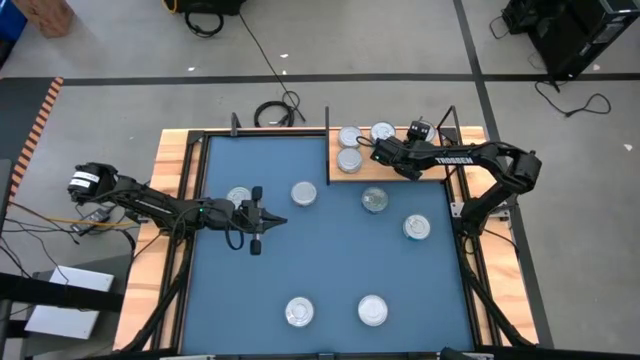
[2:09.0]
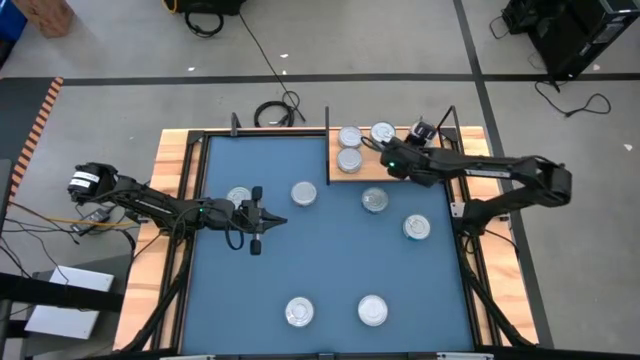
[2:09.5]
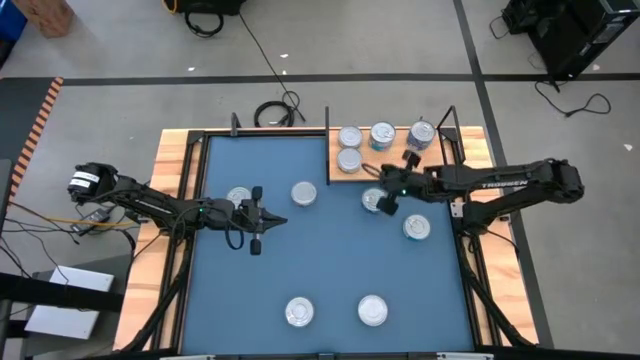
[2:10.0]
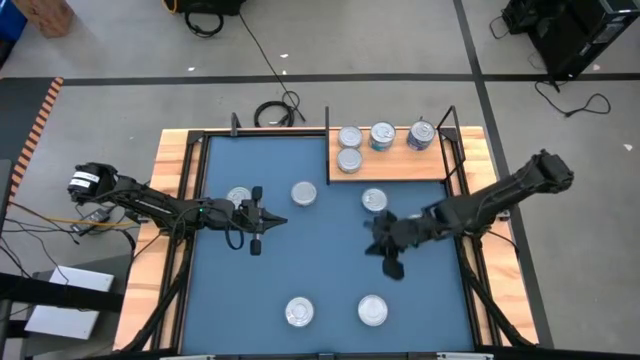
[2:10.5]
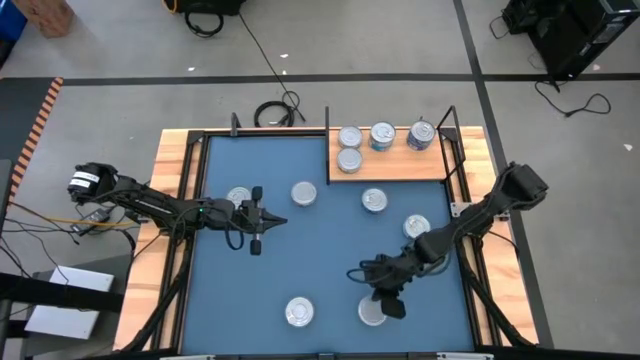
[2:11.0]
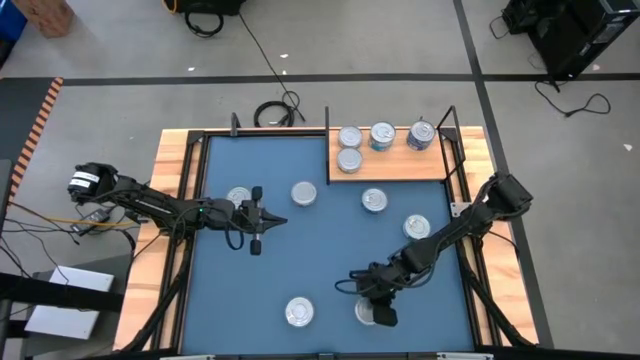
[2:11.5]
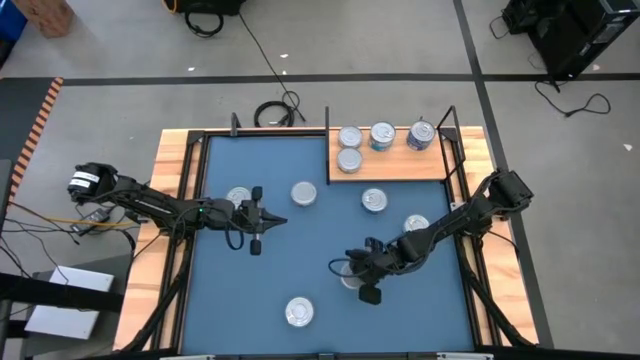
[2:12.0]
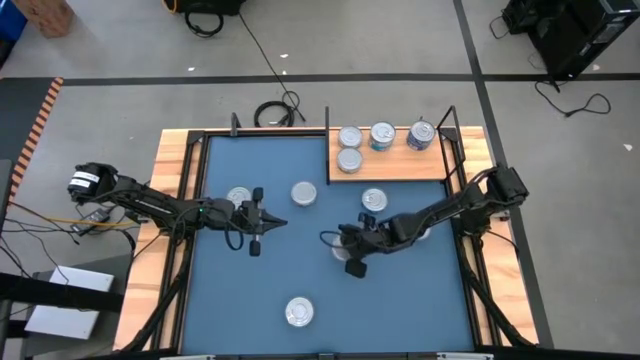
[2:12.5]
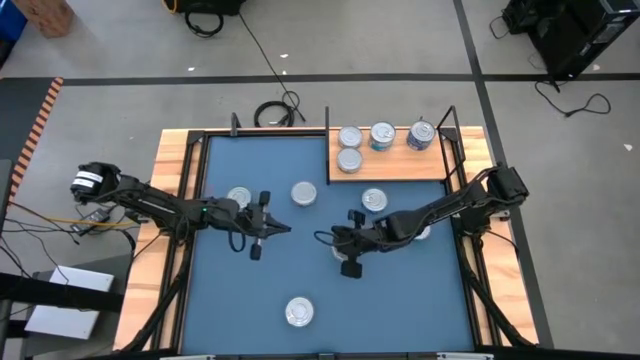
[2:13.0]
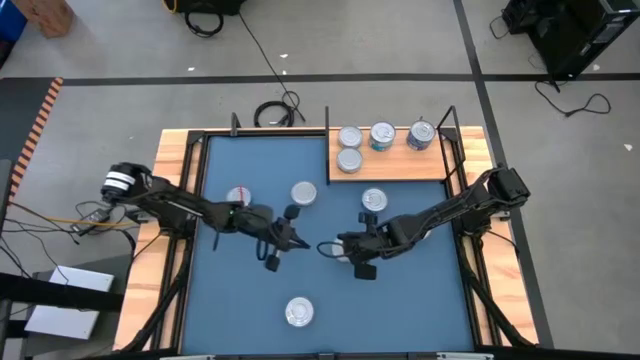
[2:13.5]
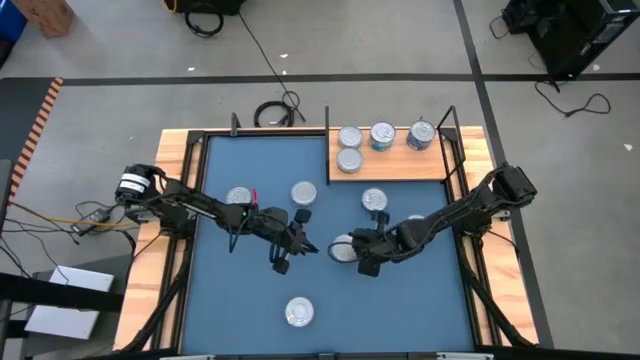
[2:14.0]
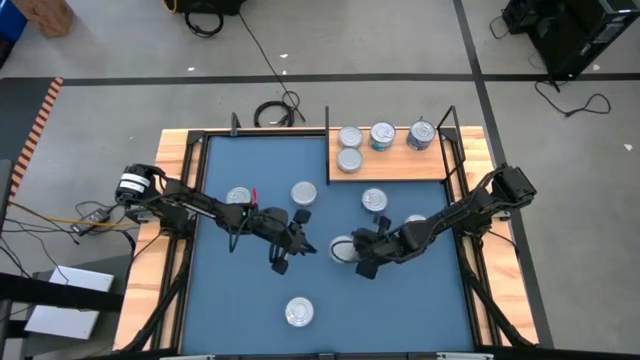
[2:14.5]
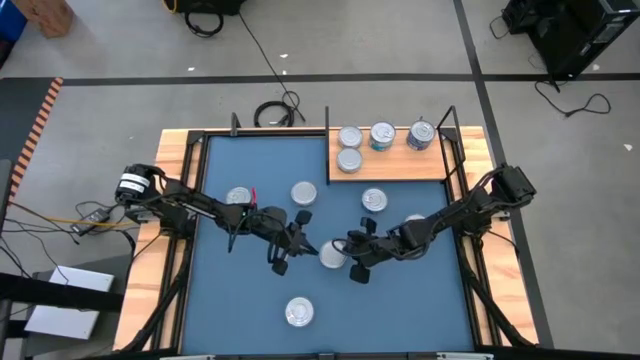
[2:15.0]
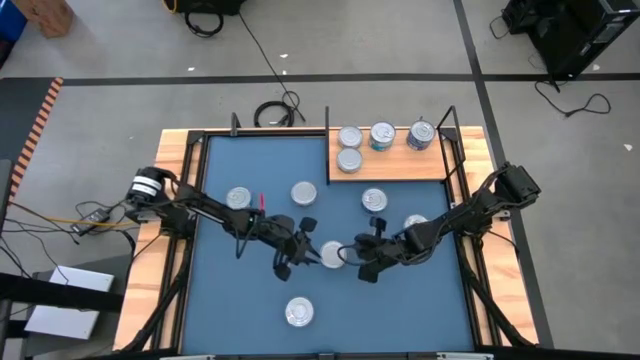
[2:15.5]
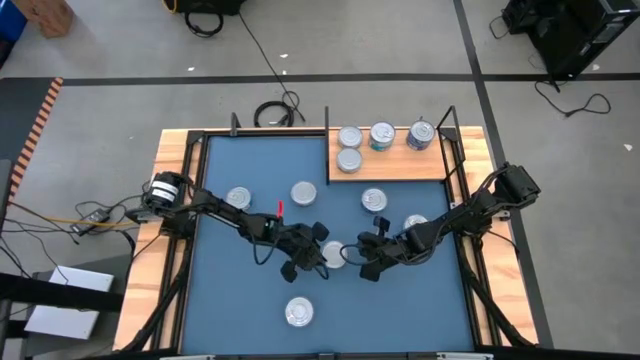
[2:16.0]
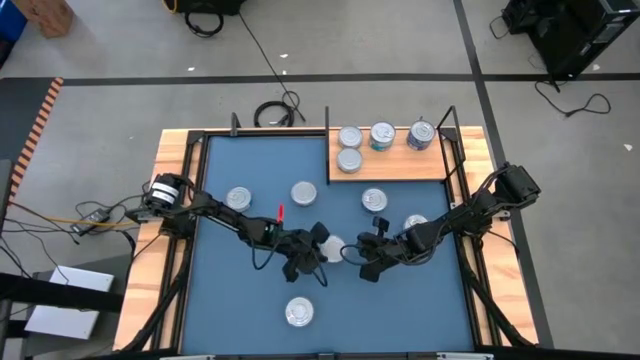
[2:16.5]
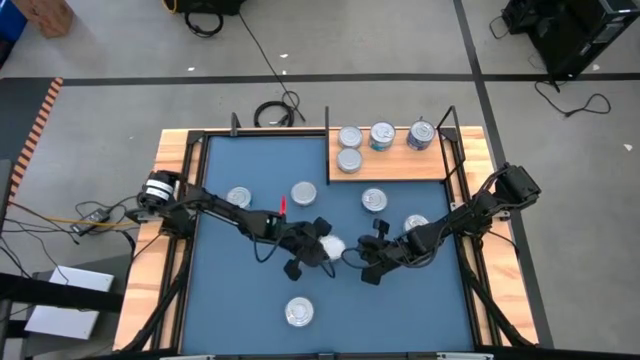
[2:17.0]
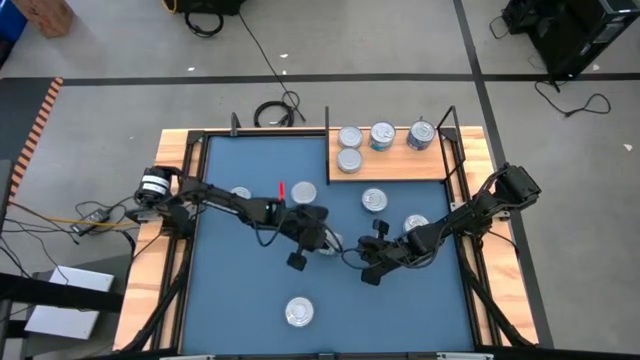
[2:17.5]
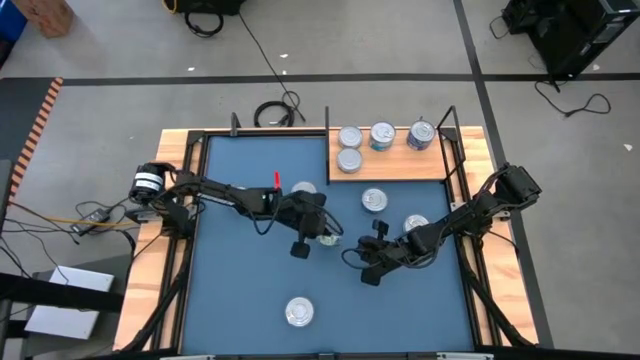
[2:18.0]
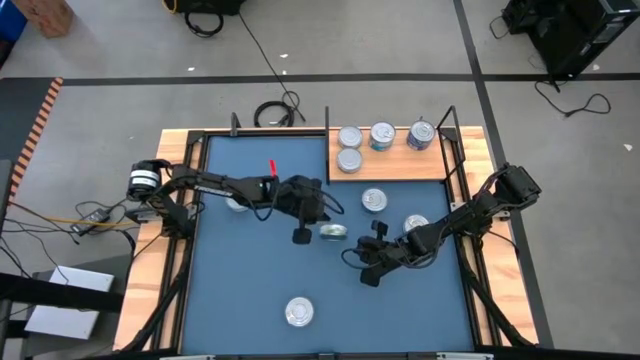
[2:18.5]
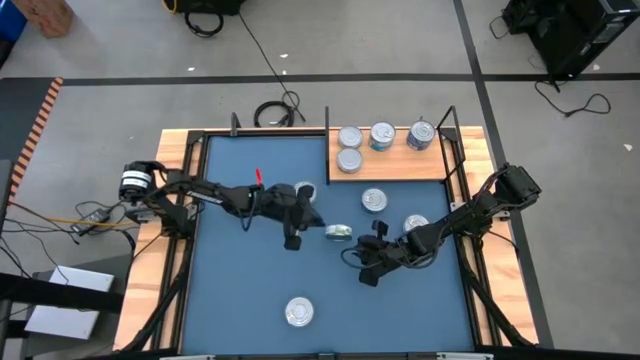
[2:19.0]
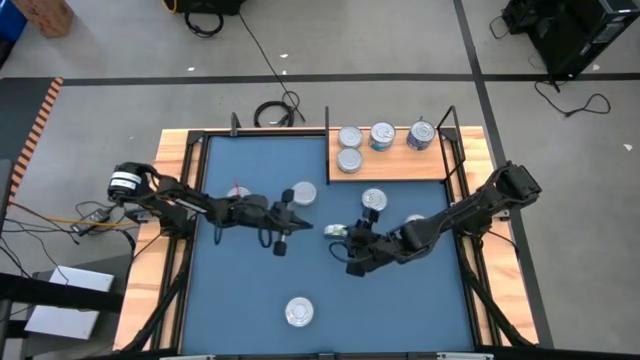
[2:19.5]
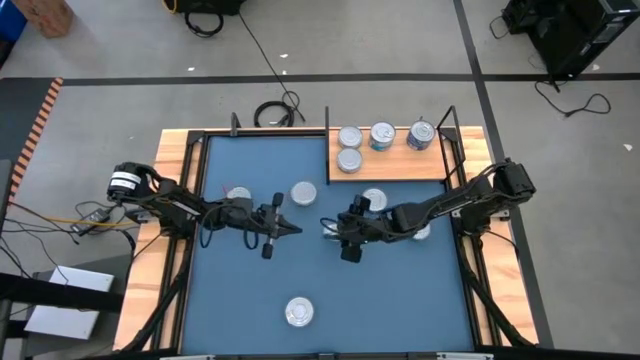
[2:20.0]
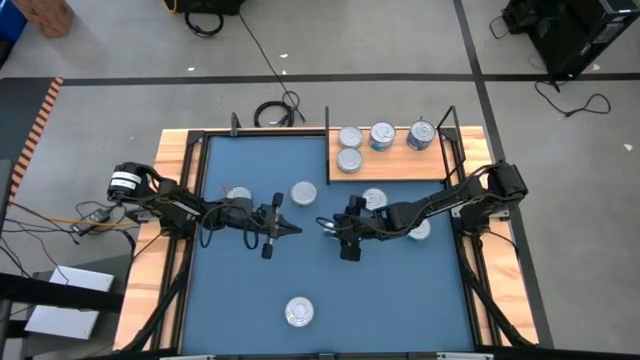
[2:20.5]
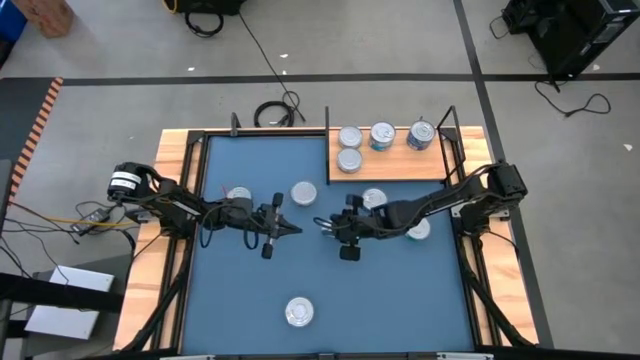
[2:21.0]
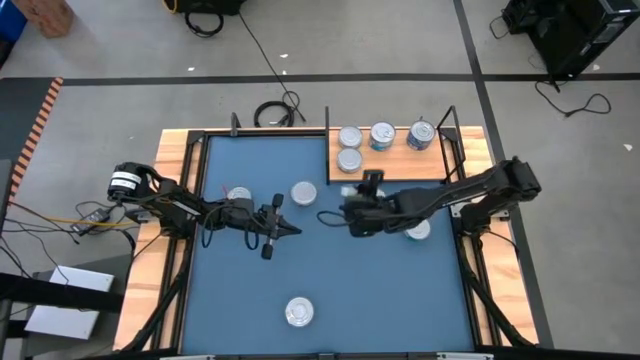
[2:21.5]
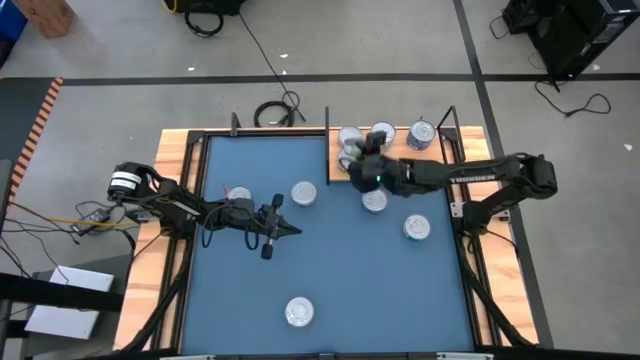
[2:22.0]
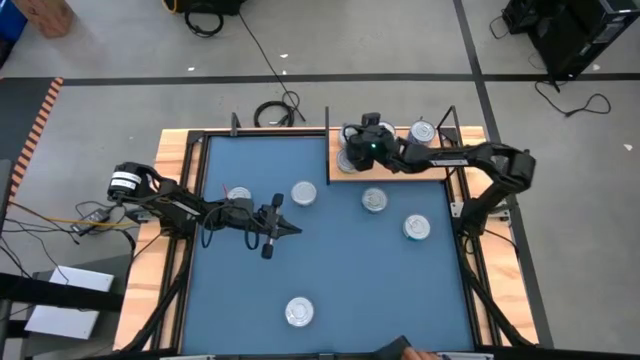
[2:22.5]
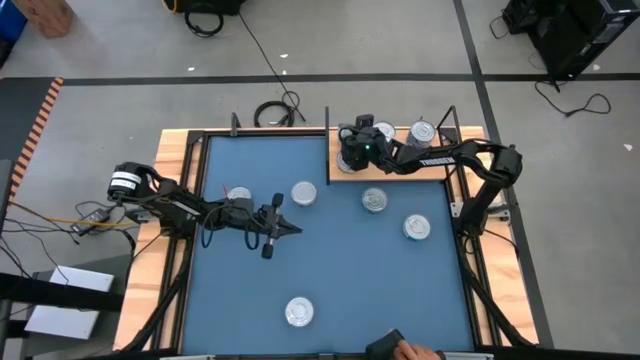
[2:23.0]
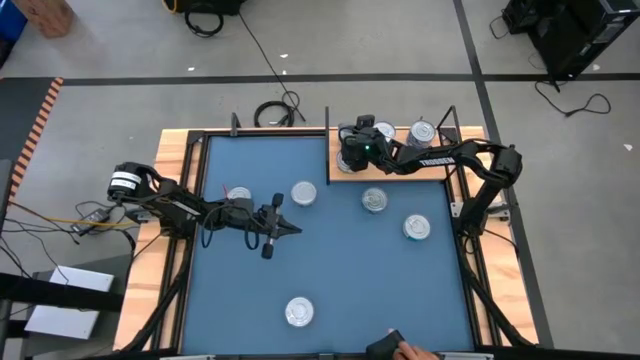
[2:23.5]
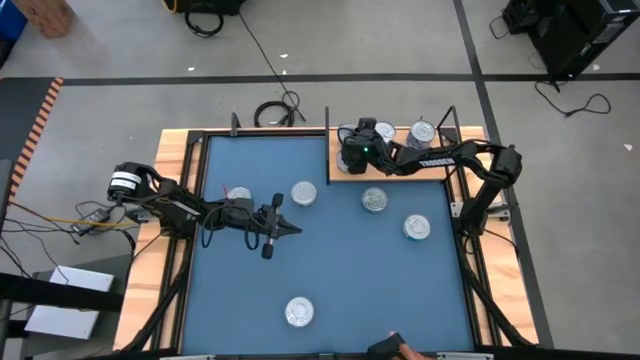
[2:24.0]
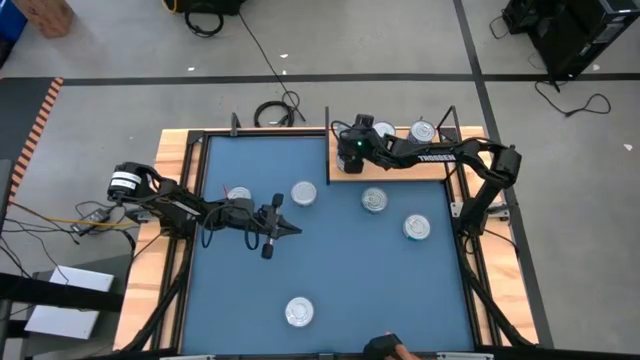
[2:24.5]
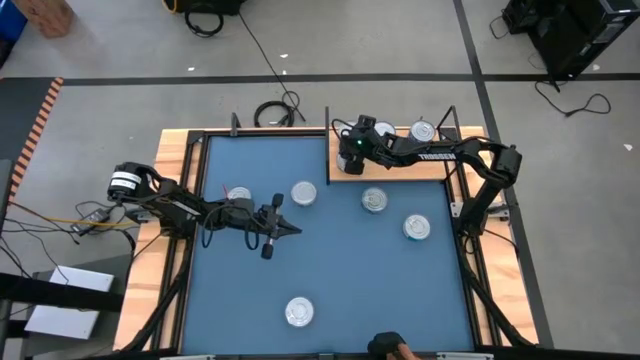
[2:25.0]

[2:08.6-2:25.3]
Task: Stack canned seafood by type on shelf
Stack the bottom green tuna can on the green tuna can on the back of the shelf

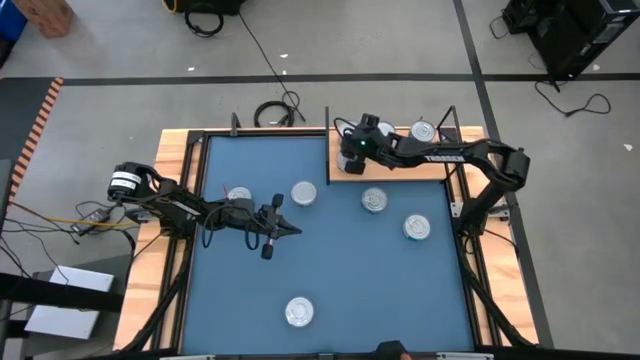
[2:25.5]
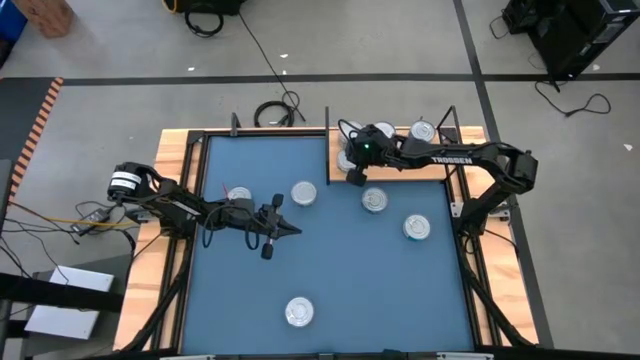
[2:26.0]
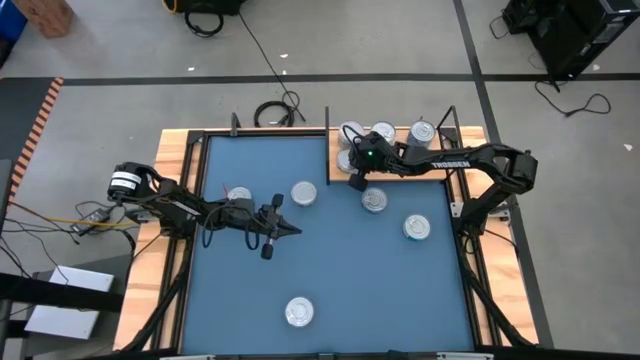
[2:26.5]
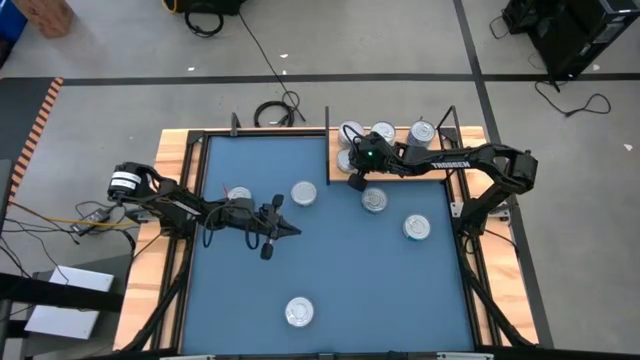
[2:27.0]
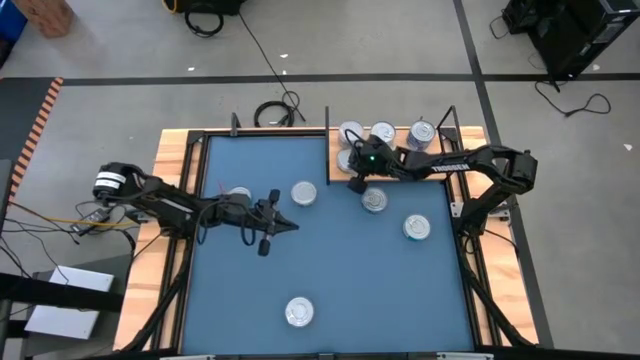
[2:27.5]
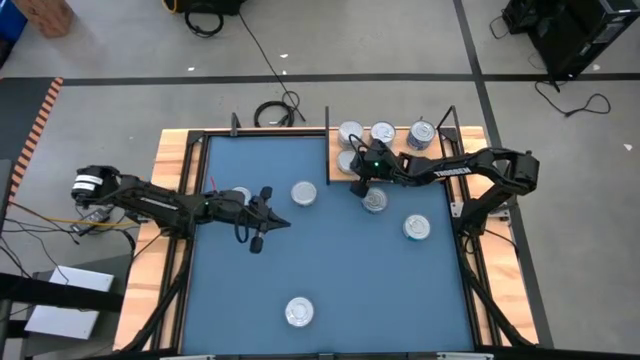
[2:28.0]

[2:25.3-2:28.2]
Adjust the front green tuna can on the shelf
